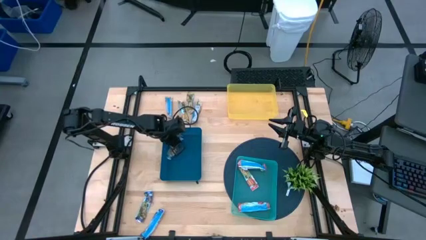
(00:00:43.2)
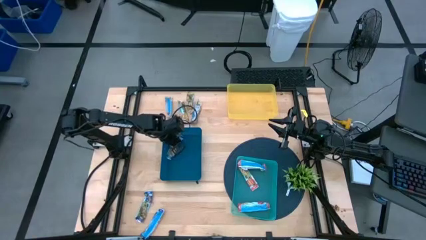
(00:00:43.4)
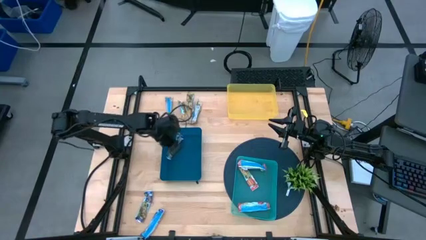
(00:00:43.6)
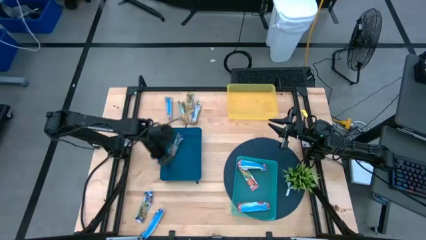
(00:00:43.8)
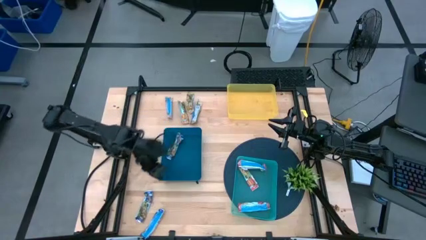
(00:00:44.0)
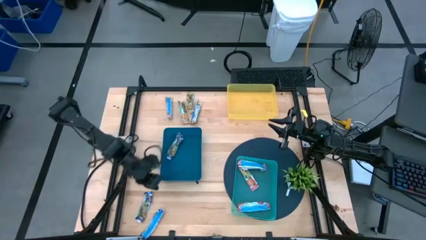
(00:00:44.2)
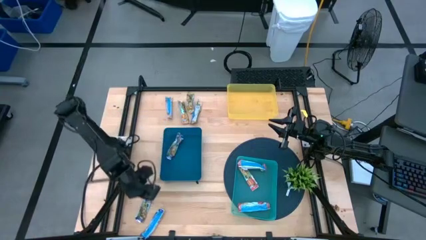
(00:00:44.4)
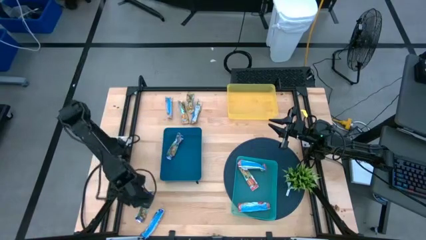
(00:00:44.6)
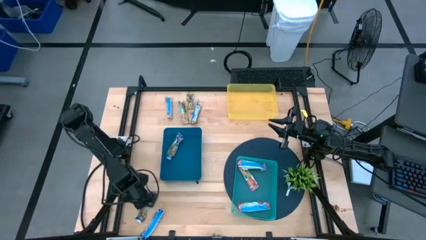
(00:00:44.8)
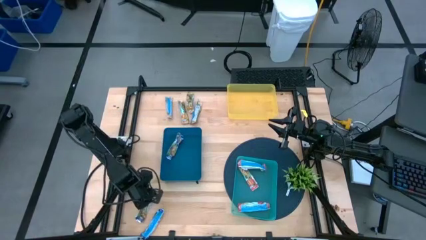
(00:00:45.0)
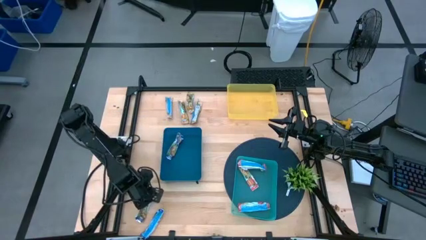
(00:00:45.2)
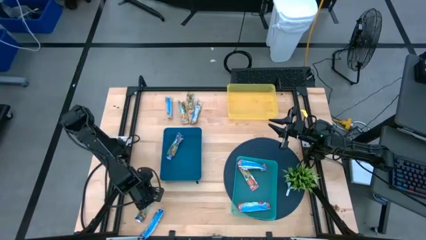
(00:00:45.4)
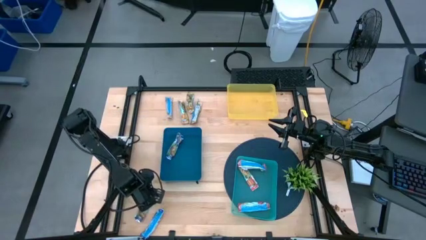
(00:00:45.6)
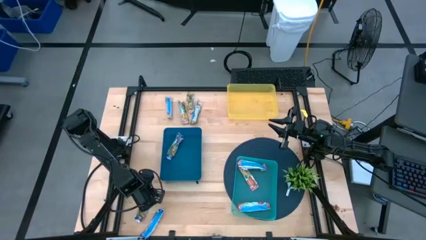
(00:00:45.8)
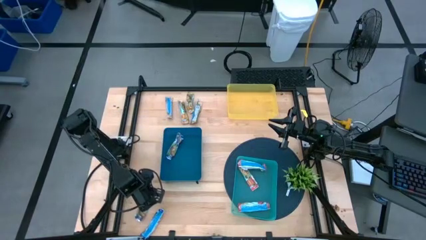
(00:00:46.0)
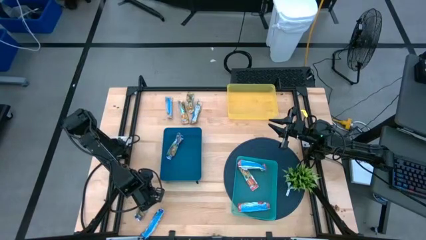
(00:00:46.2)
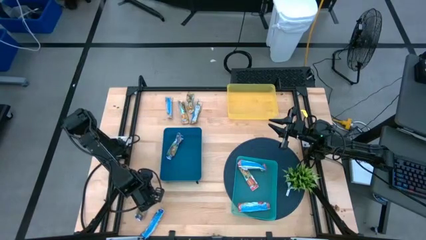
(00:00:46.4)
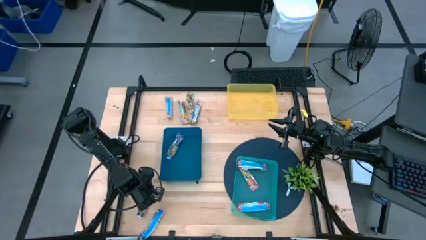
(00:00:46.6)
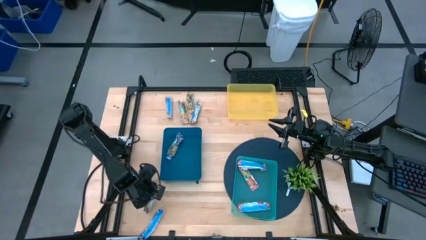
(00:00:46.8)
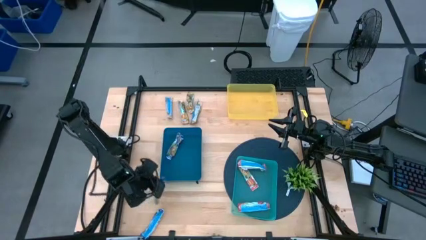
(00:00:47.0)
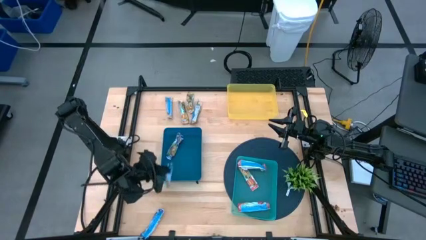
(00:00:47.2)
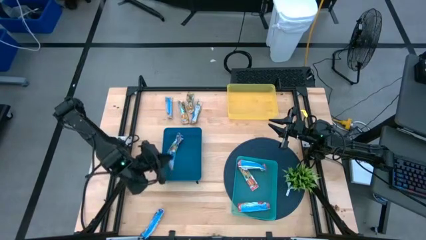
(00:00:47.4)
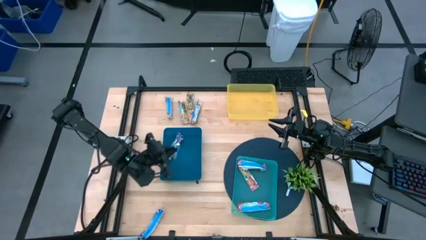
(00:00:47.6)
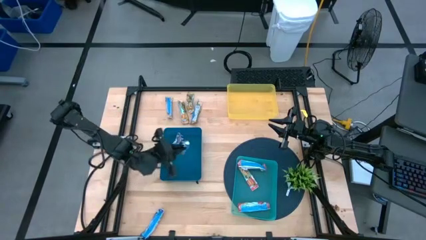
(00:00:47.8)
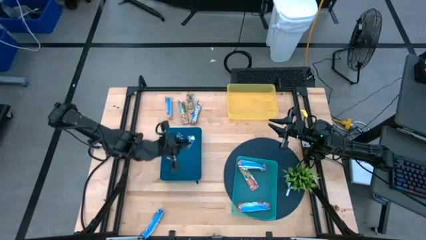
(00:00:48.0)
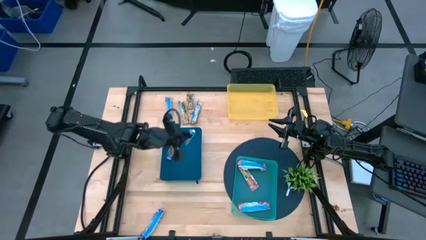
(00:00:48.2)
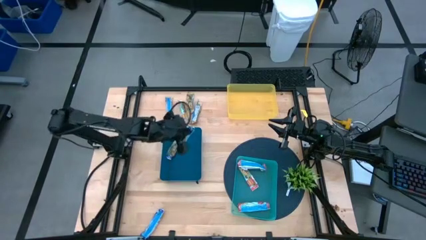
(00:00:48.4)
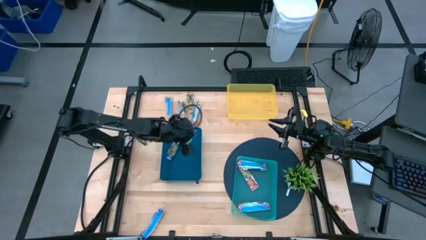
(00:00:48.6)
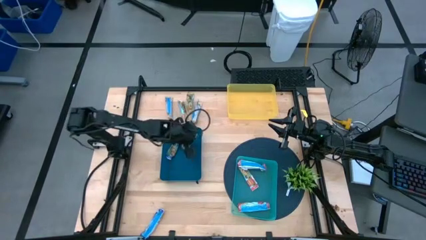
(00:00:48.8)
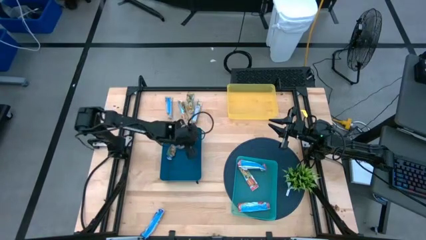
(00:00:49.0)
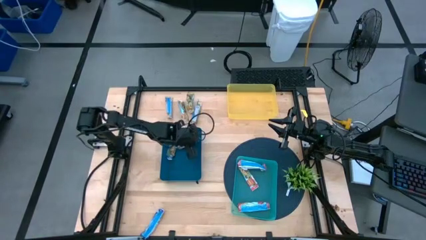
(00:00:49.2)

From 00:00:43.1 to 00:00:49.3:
Task: Pick and place Granola Bars by type
Put the left blue granola bar into the blue bin

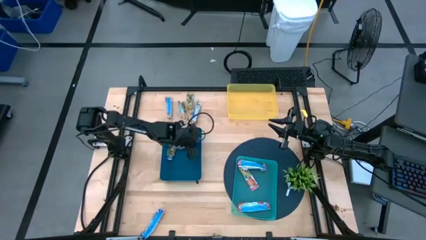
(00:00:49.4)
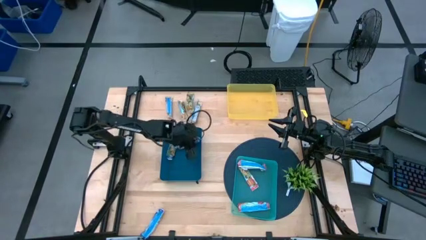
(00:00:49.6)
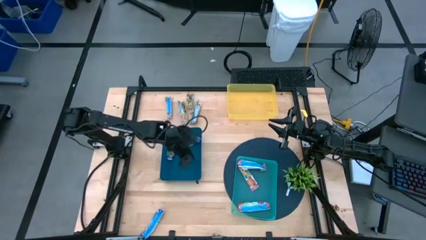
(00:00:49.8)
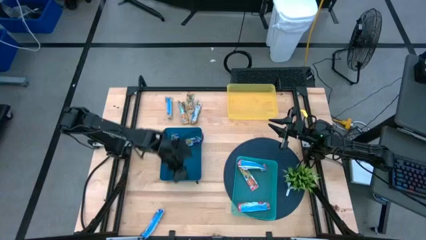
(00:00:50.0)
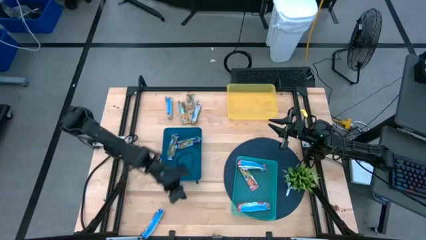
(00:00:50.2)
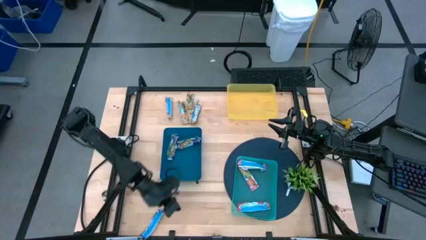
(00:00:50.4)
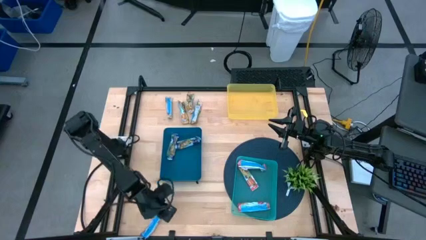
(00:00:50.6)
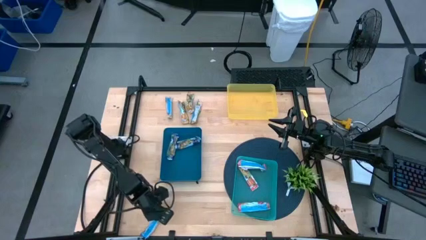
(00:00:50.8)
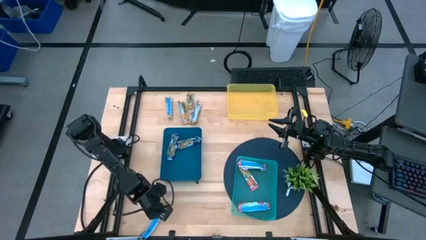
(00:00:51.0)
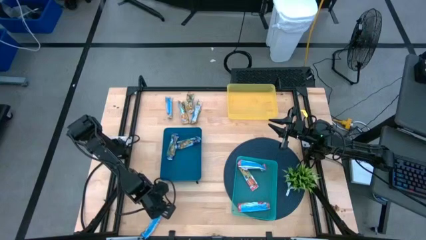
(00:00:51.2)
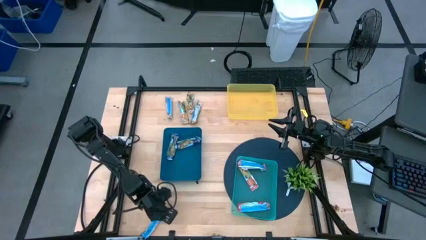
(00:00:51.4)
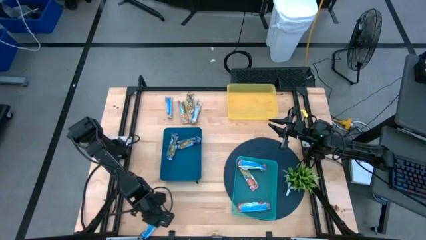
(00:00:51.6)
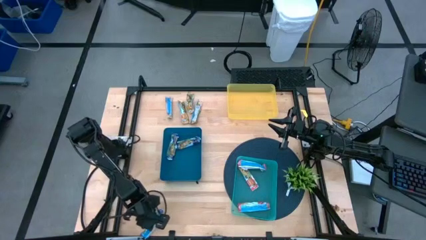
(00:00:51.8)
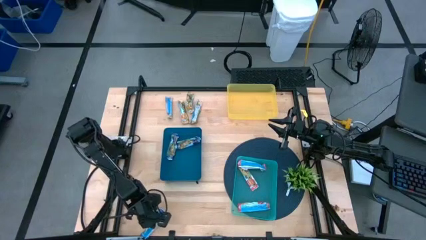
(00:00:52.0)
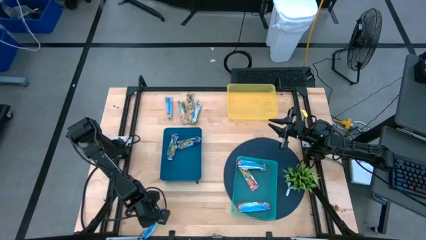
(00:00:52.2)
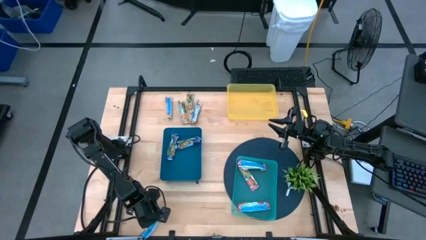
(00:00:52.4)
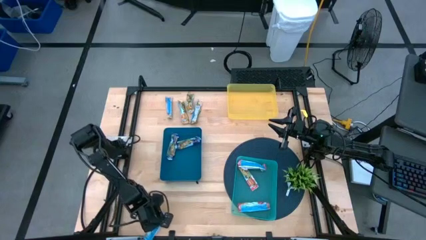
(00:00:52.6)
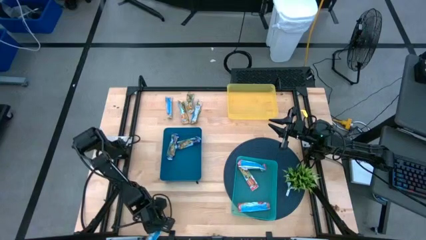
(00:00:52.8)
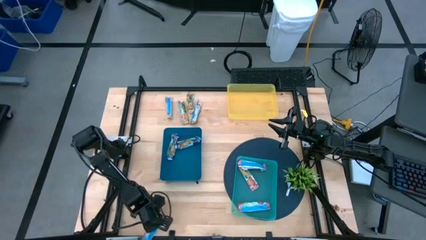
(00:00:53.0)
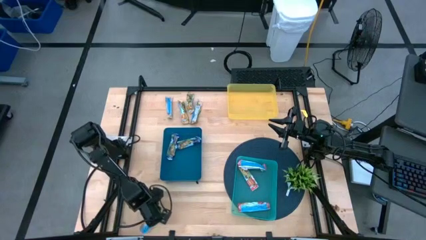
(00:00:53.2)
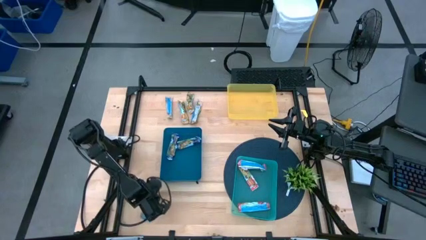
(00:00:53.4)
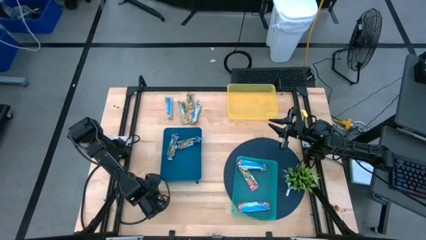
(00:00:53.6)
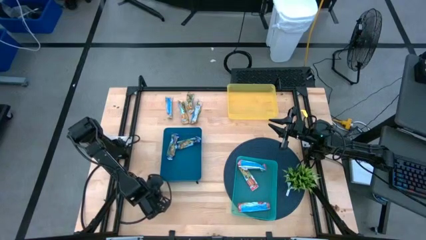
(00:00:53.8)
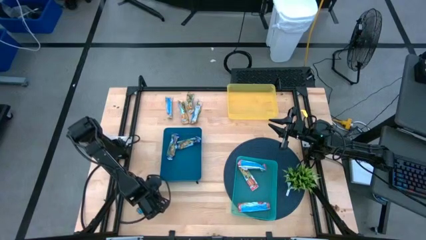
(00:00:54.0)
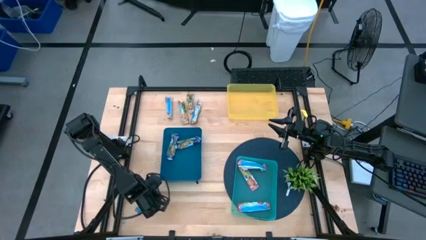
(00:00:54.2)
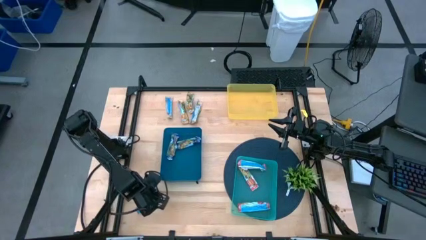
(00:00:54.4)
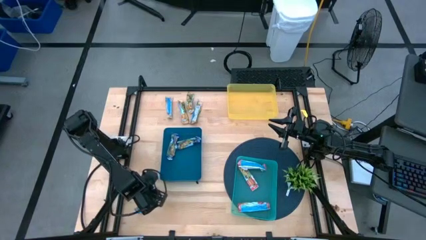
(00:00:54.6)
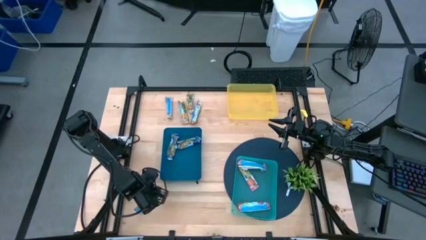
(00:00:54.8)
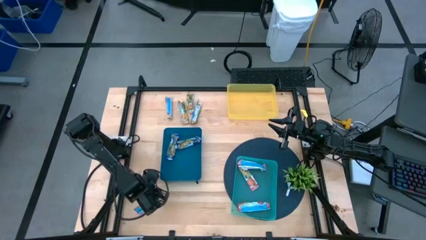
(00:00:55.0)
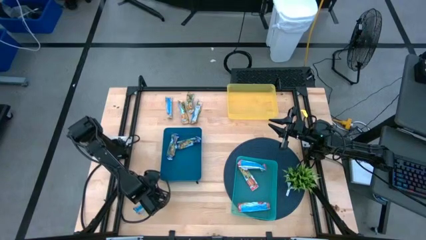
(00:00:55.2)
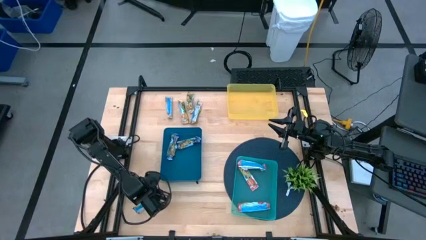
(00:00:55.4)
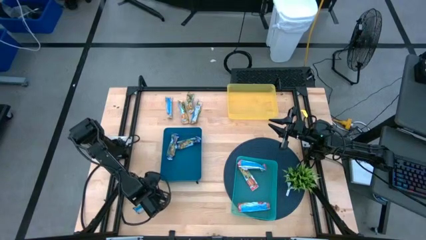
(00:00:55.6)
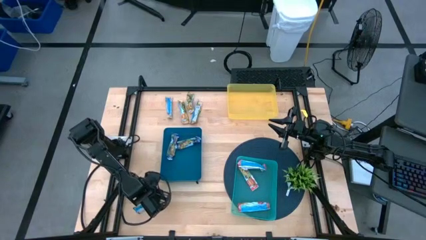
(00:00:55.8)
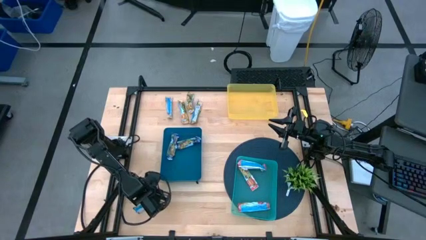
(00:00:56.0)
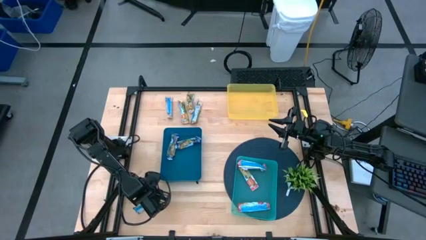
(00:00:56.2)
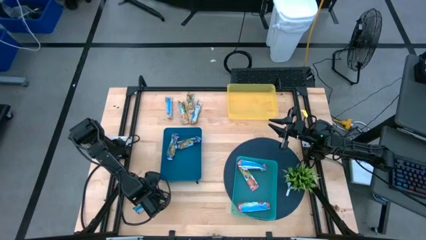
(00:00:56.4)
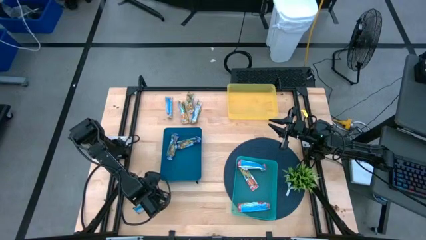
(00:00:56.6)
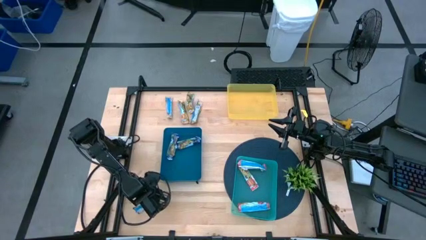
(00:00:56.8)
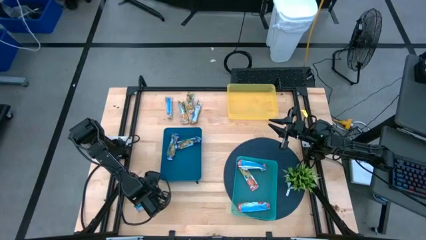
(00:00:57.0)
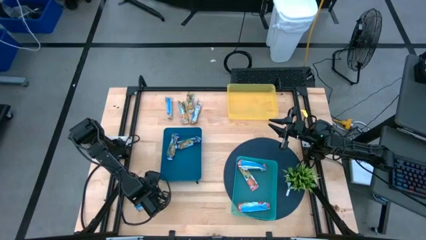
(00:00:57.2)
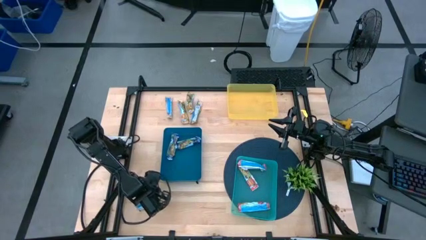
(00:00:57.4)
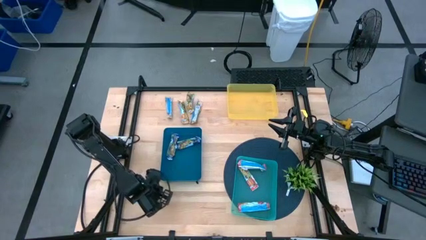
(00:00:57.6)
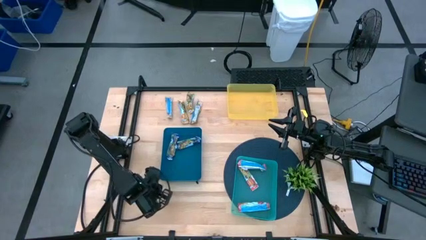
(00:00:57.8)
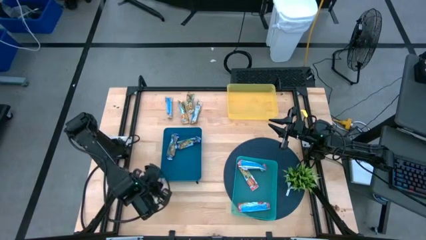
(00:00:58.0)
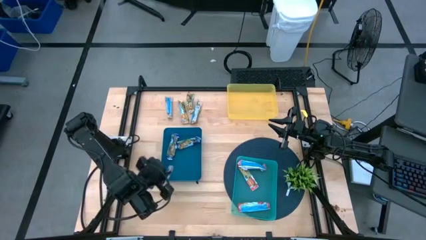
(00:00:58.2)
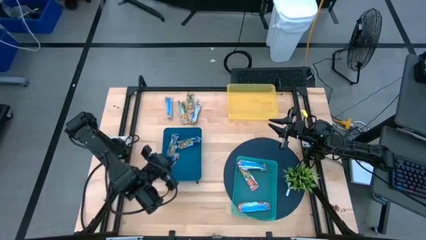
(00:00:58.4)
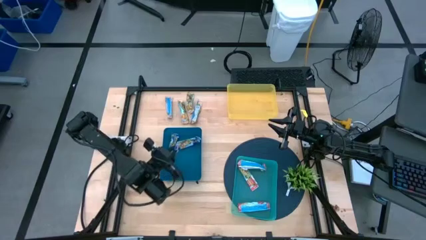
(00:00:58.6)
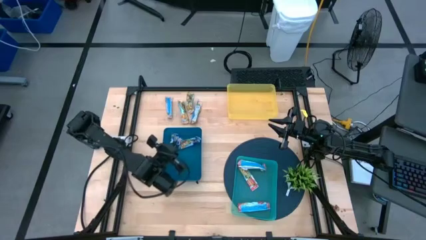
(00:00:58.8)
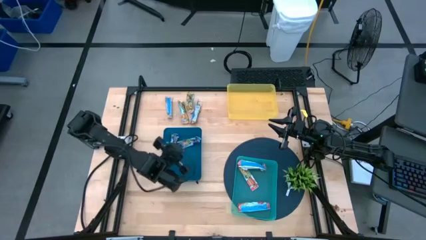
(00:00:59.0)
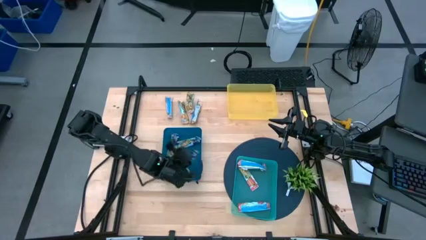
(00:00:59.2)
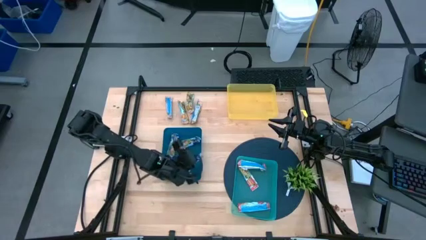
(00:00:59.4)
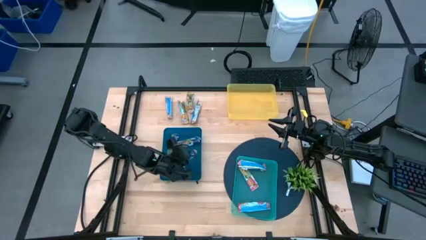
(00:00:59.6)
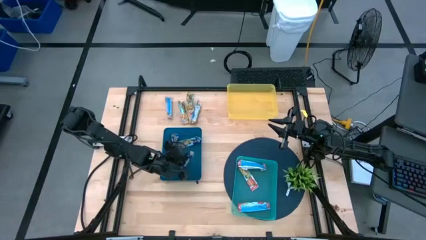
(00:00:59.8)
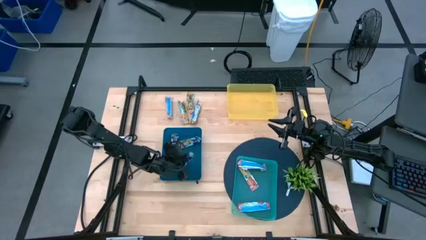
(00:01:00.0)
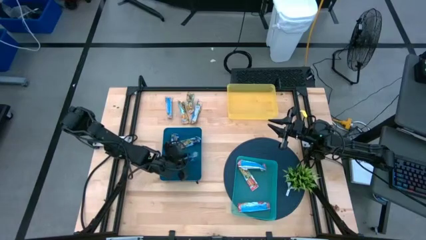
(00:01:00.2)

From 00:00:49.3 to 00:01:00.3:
Put the blue granola bar into the blue bin
